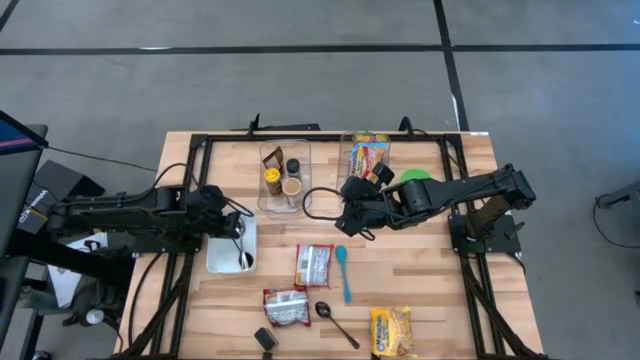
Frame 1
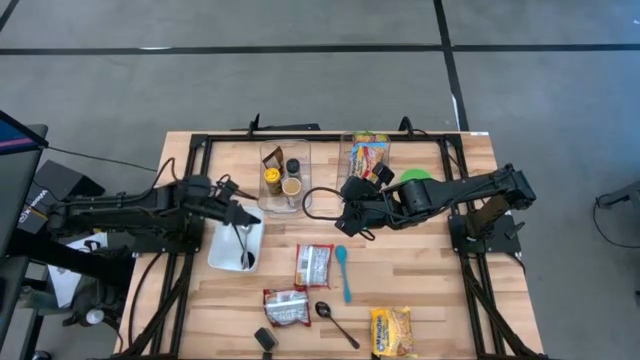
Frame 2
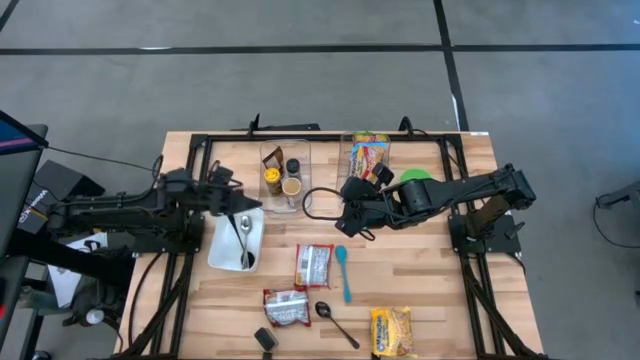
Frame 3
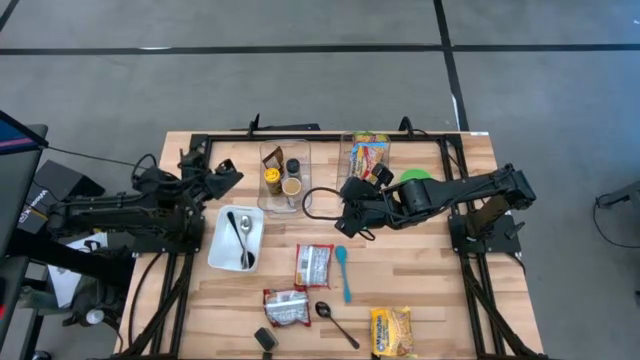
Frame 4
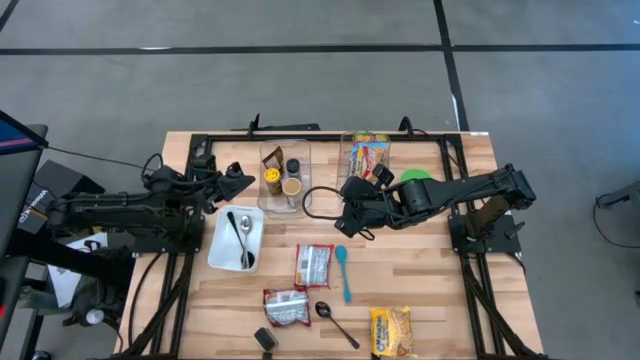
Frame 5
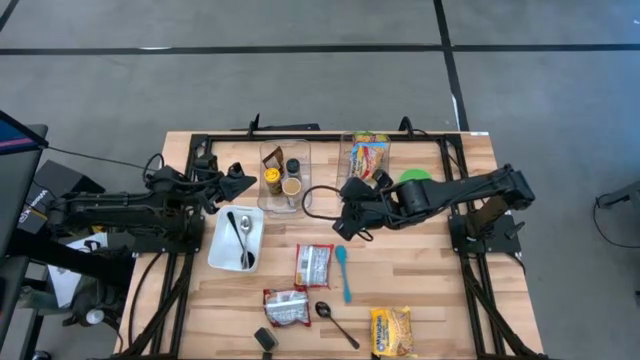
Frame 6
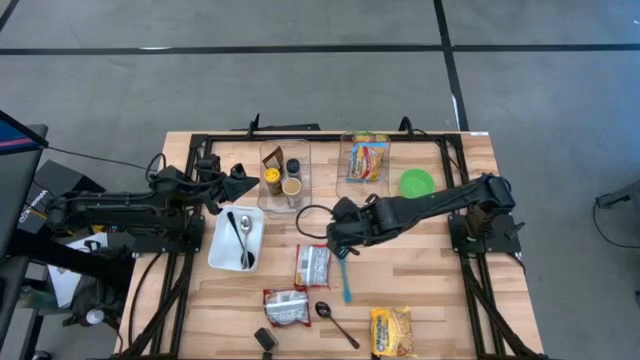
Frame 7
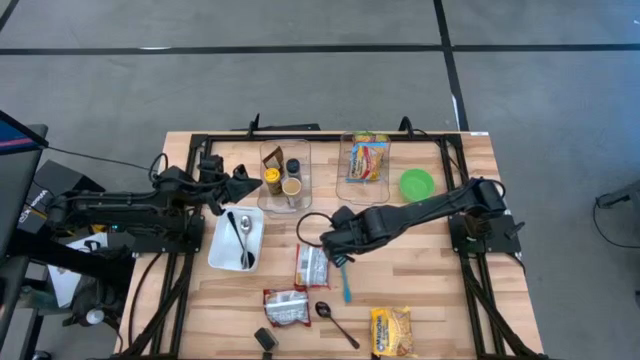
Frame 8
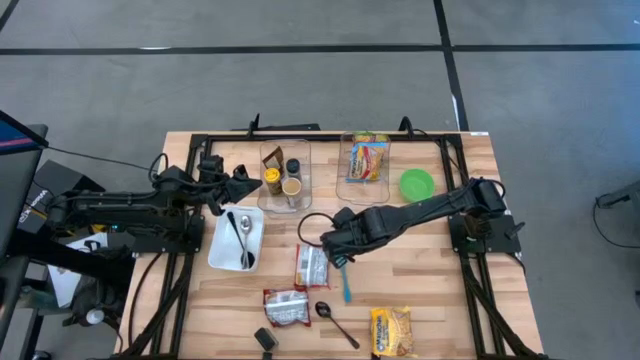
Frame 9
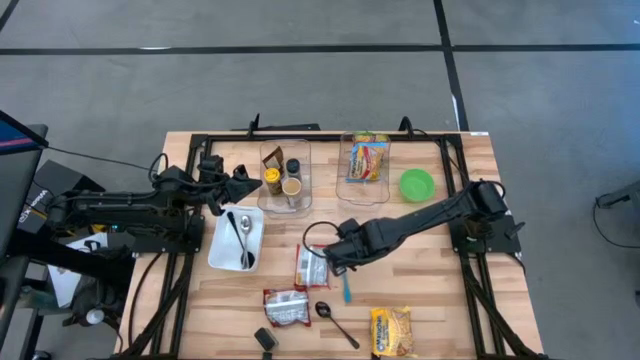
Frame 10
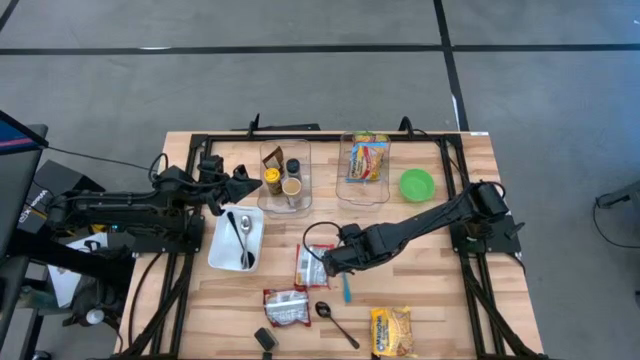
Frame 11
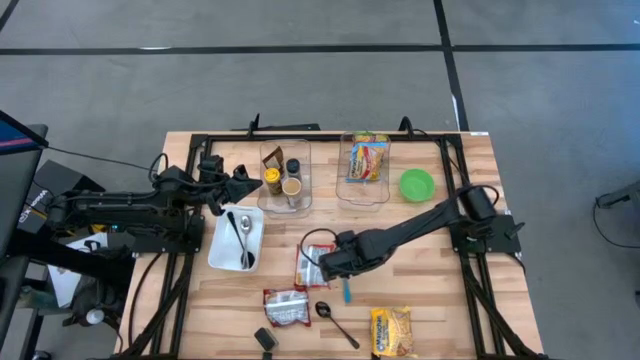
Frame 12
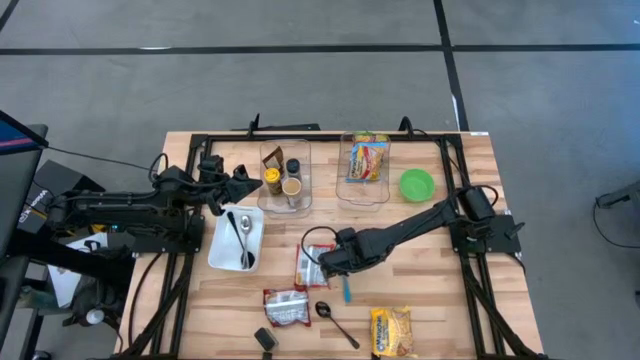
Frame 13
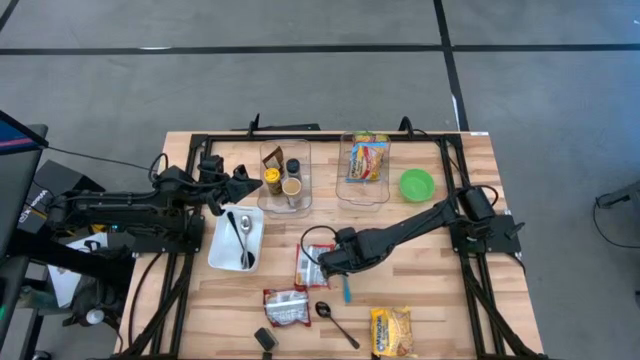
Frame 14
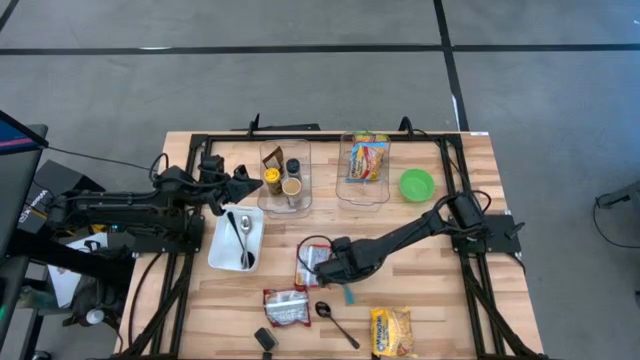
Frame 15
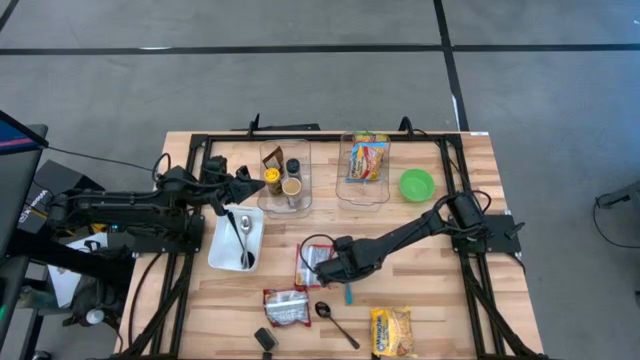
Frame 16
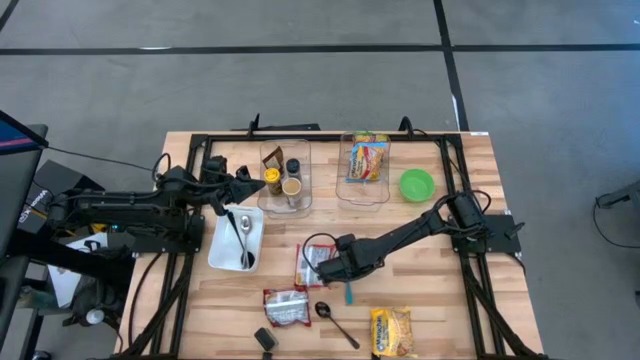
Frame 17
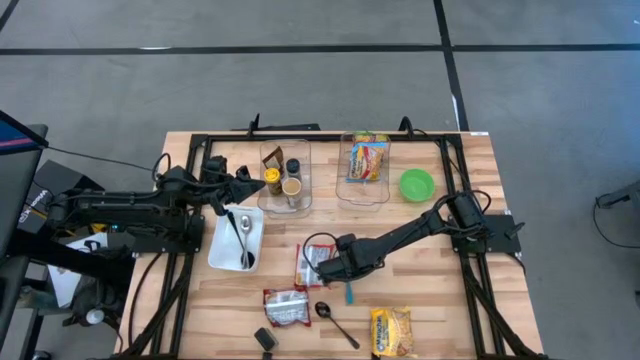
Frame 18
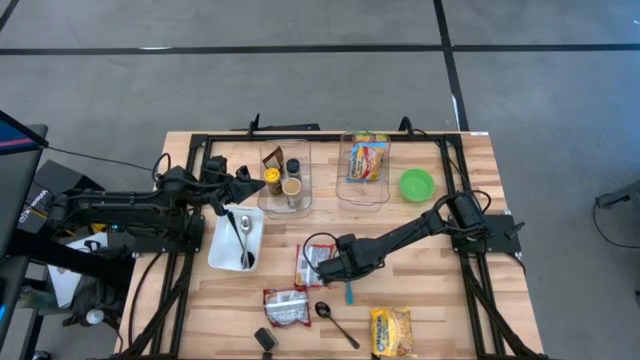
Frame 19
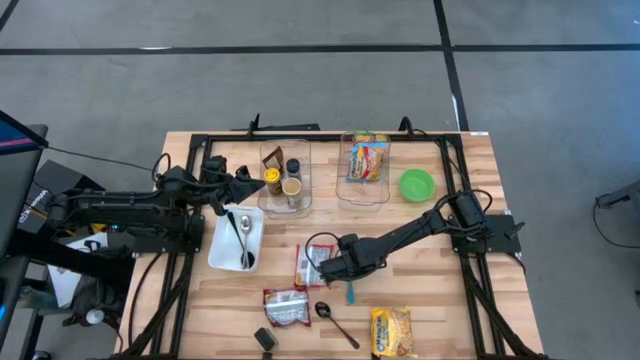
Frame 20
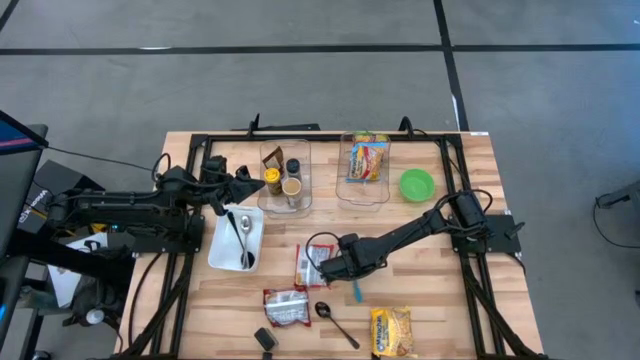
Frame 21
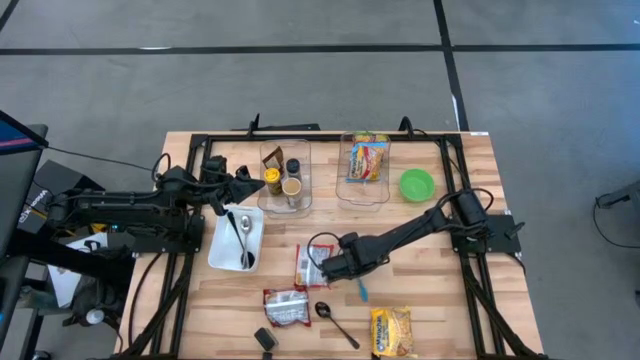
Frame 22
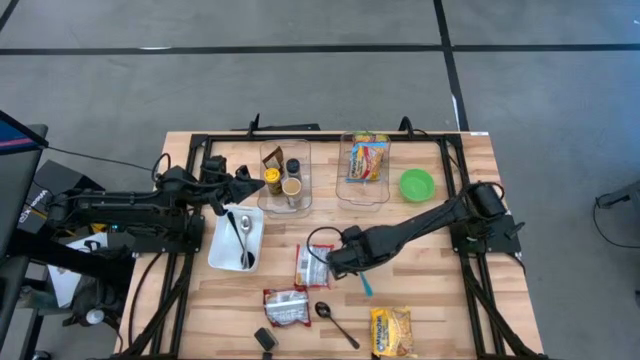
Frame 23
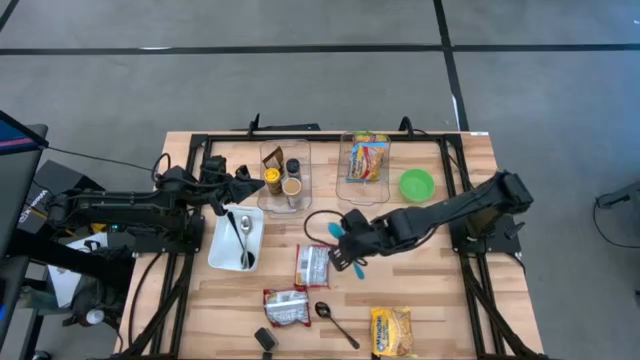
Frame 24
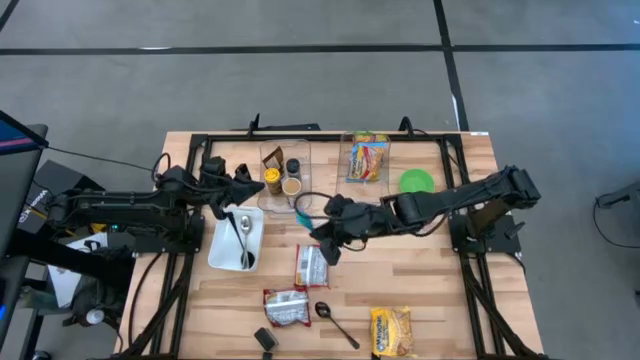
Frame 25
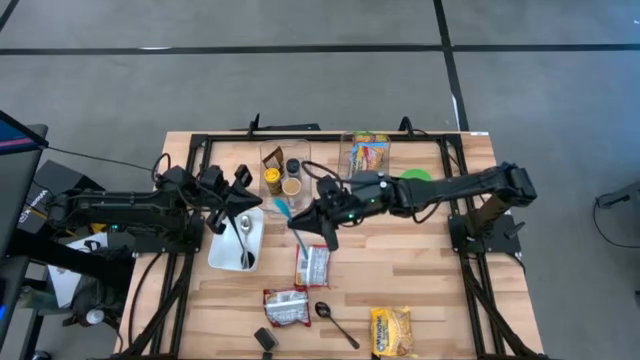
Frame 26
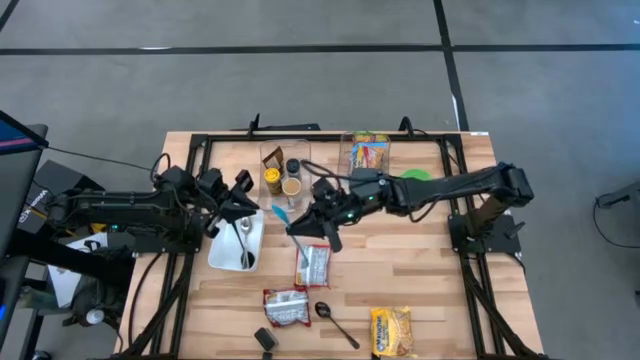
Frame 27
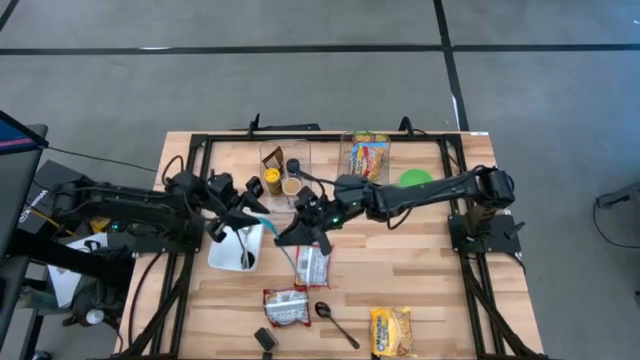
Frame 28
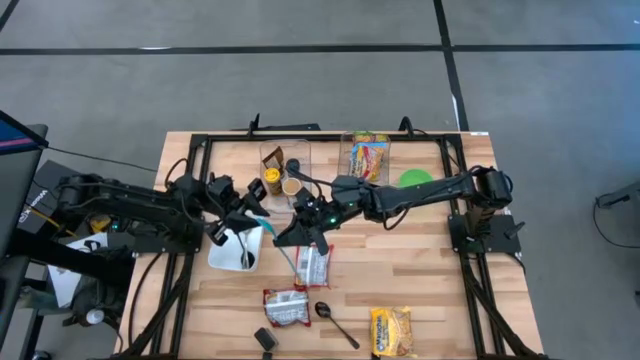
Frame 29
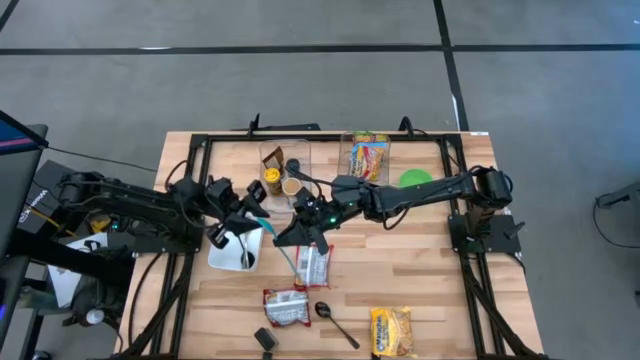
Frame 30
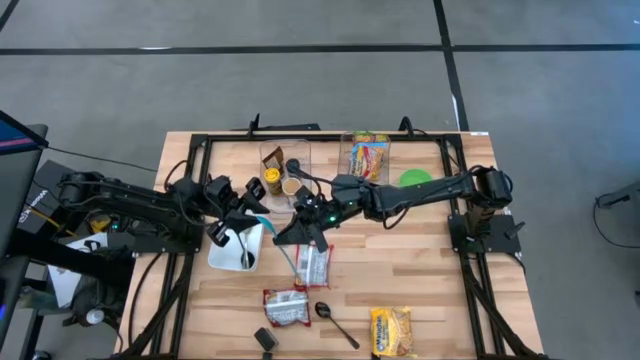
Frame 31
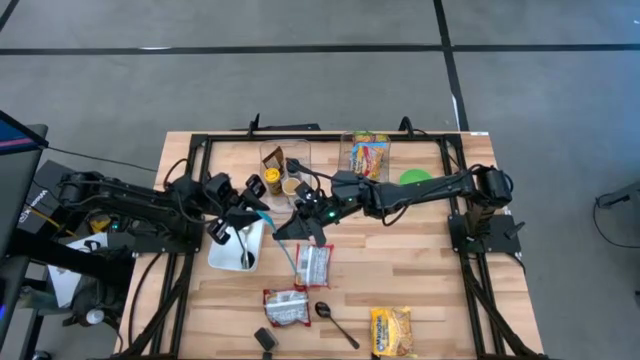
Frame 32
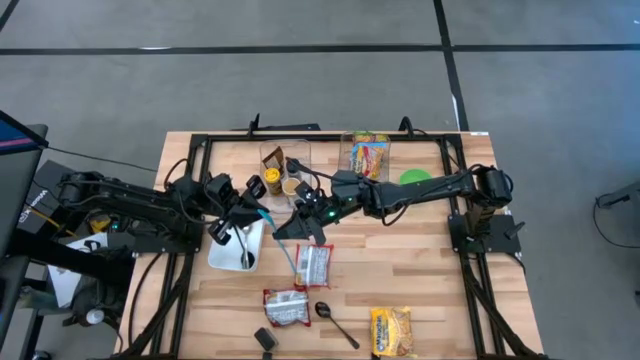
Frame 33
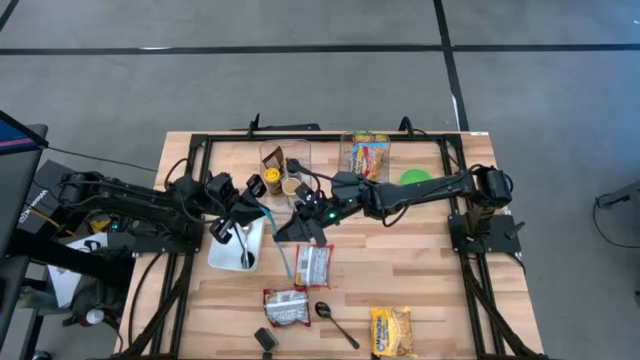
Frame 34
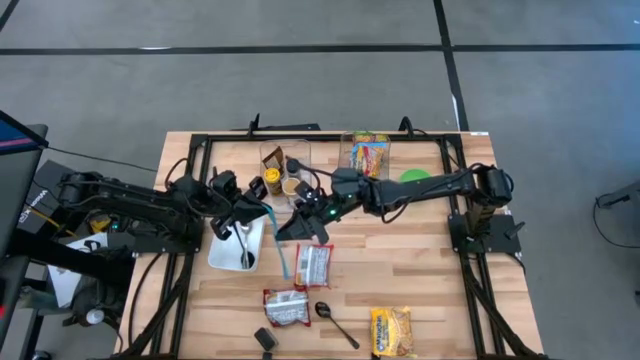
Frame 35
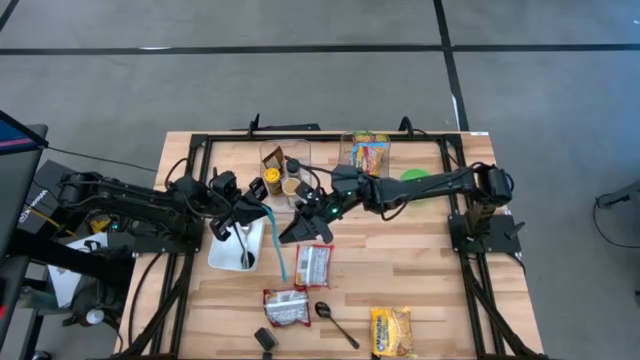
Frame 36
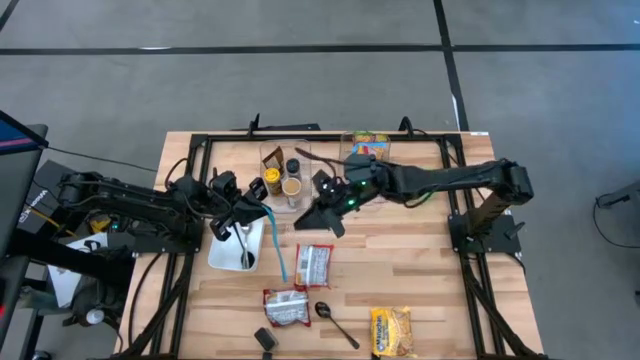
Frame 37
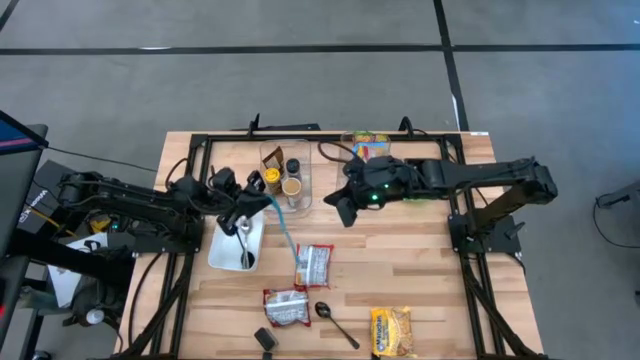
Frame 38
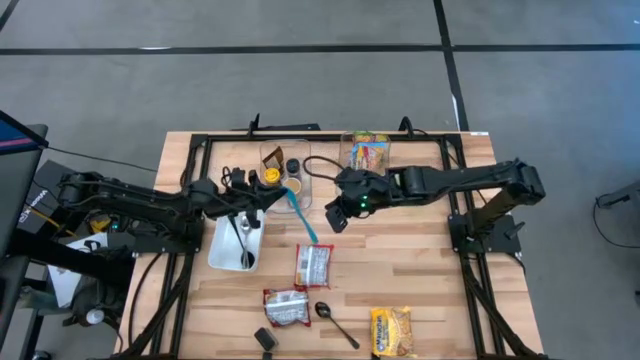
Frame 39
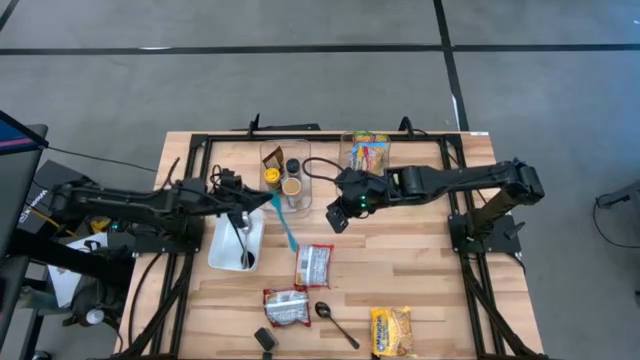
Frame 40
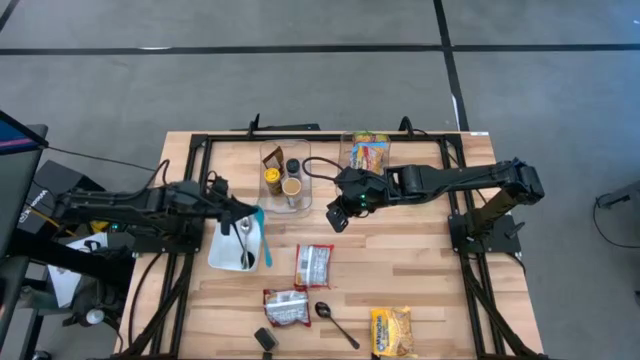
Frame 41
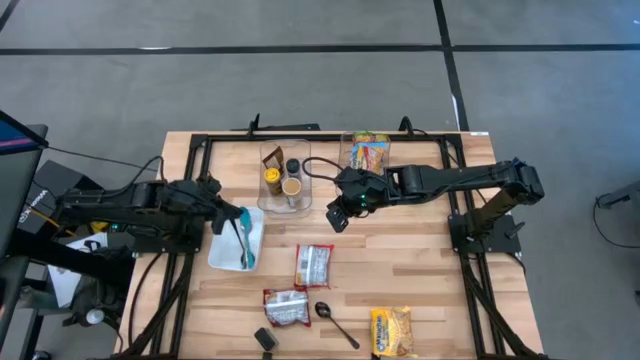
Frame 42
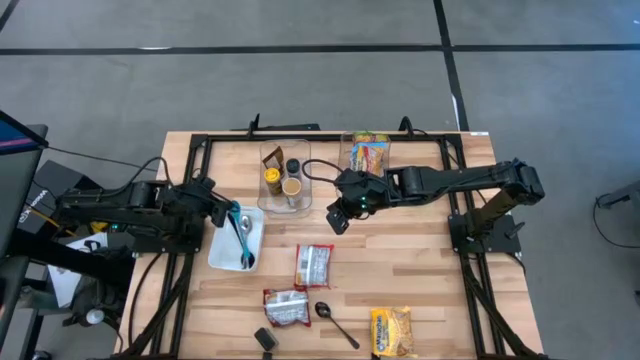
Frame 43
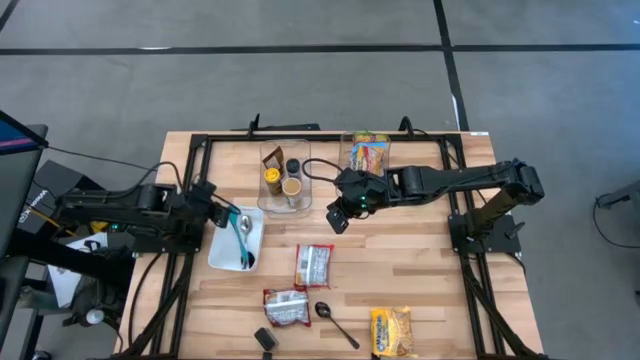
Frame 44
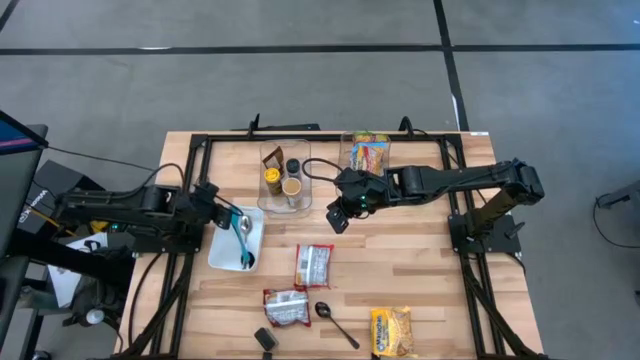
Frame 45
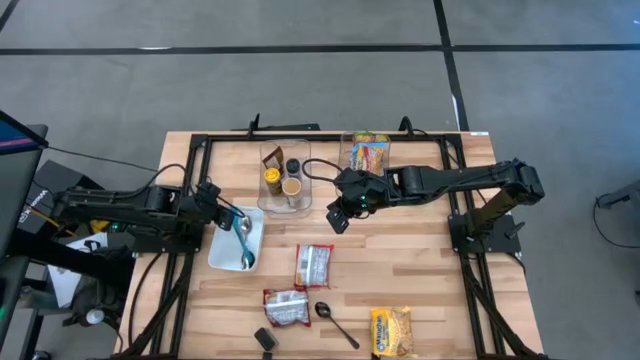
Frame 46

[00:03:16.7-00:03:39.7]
Task: Pick & Place Food Item
Put the blue baby spoon into the white bin
